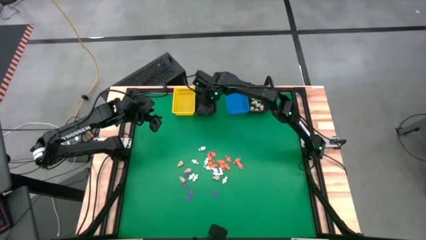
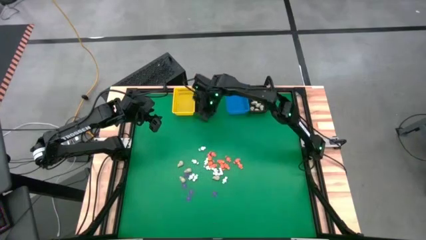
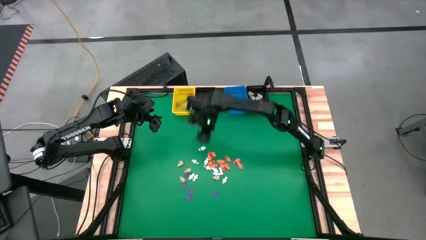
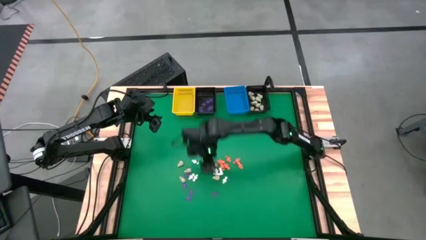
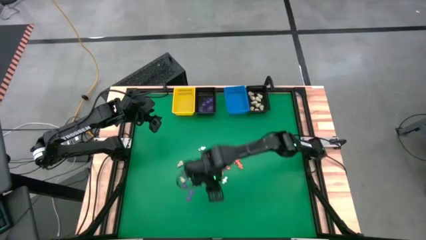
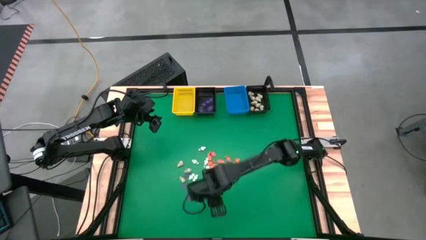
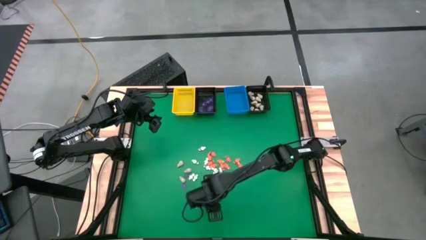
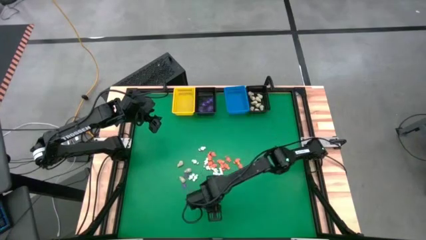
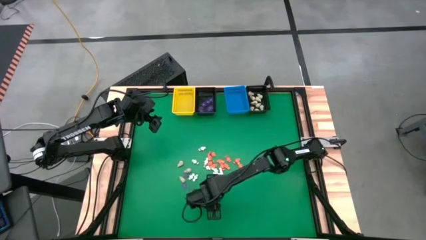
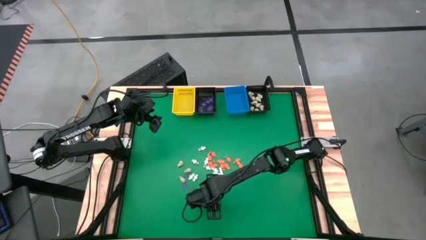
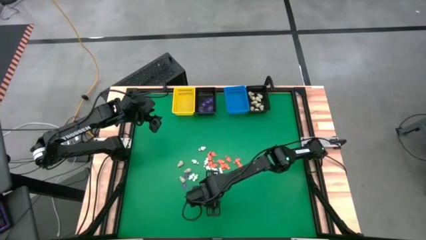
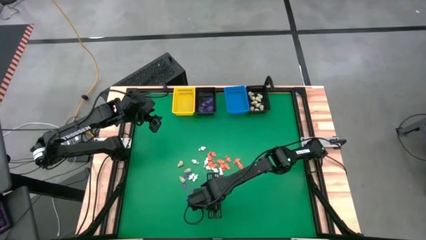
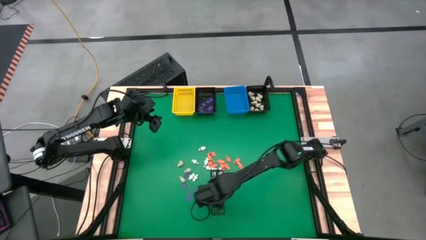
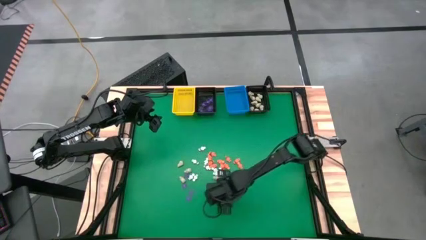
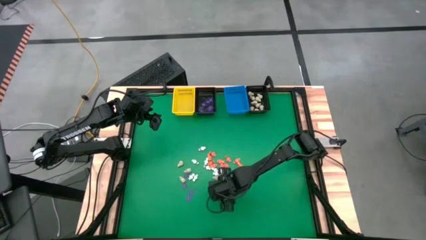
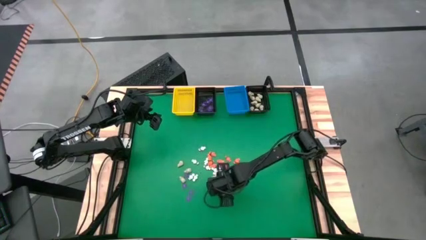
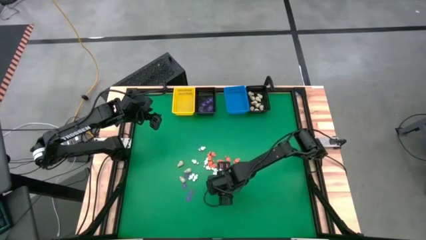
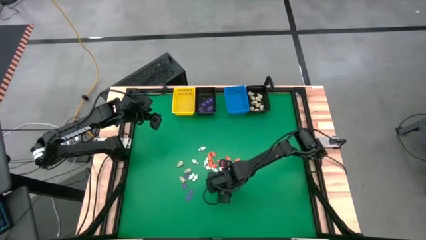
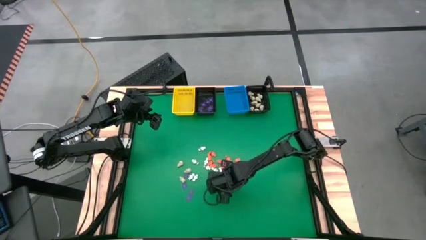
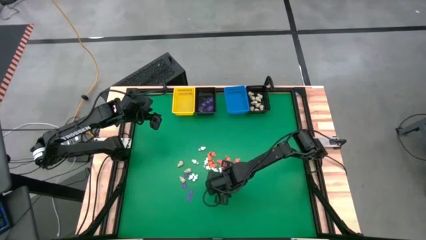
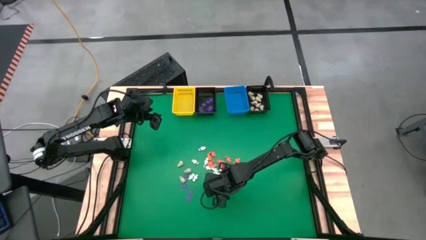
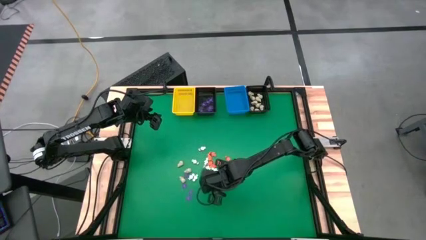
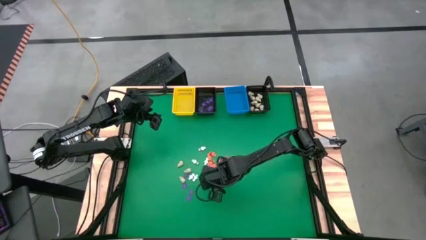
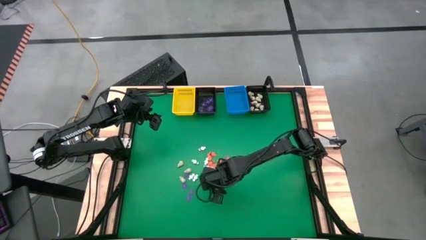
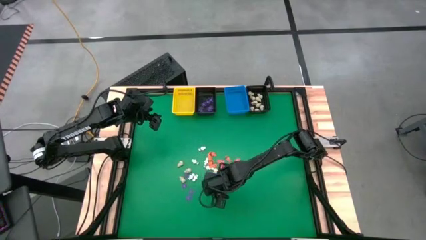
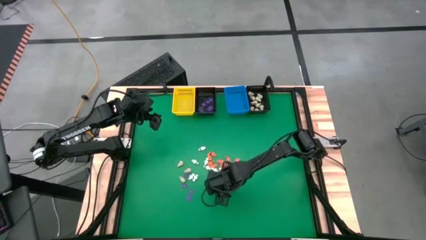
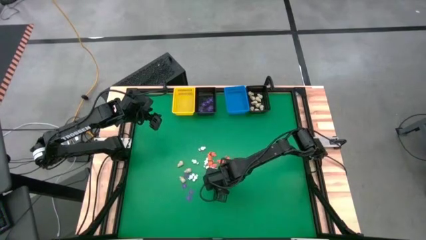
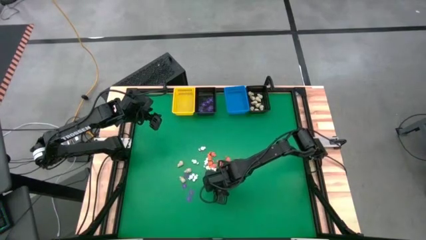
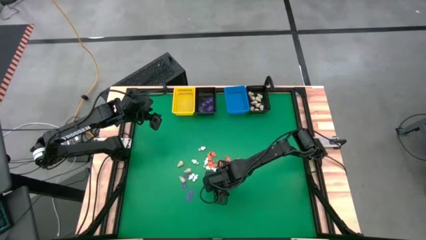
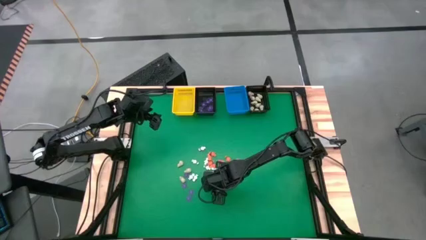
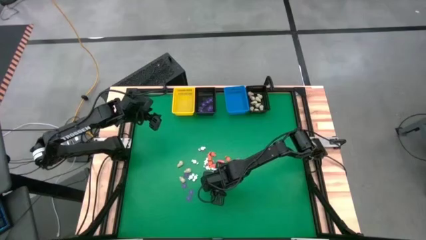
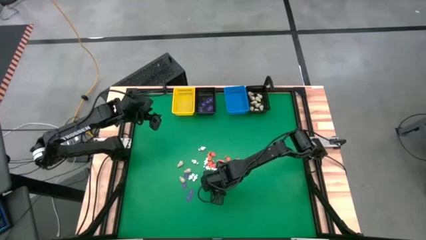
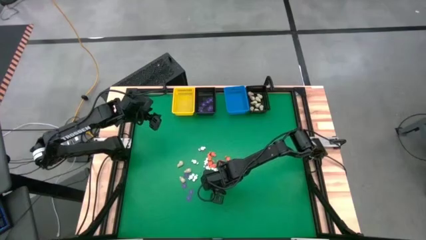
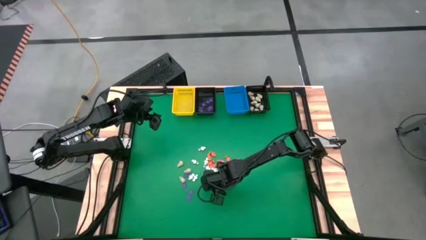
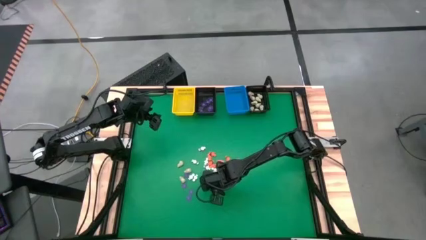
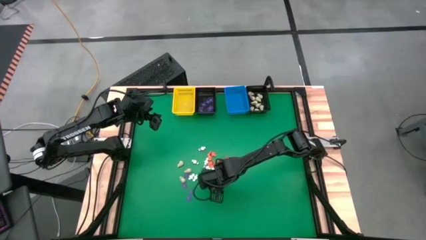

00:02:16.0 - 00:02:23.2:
Task: Sort Halloween decoration
Put the purple spider toy into the left black basket

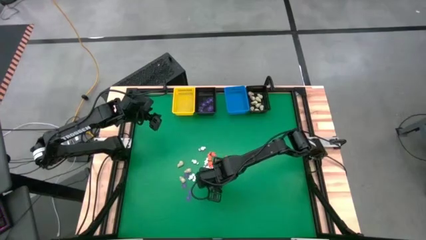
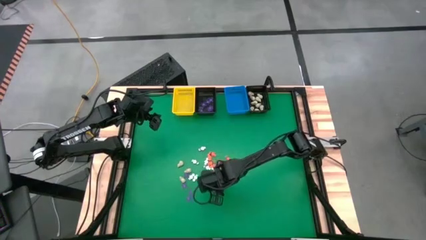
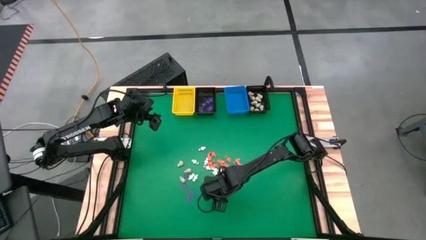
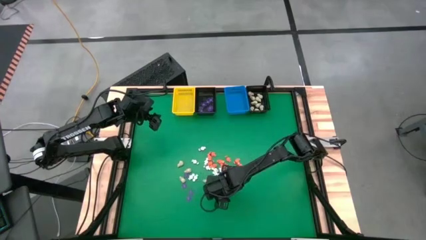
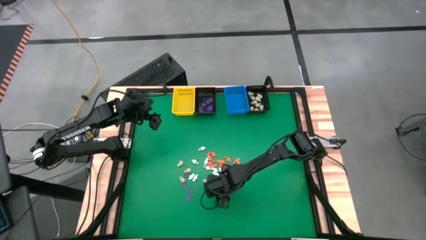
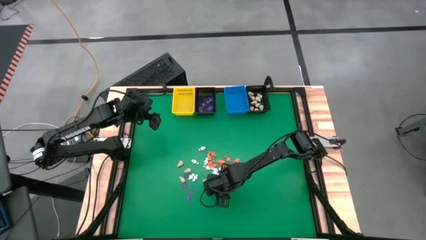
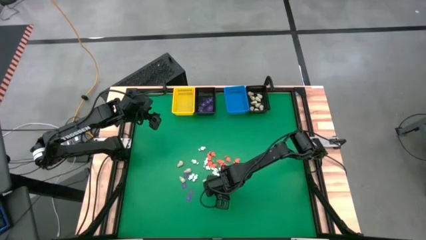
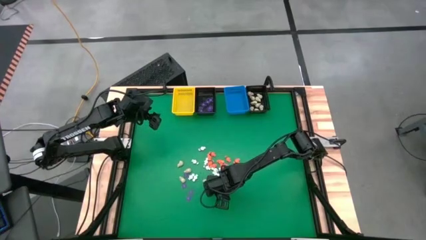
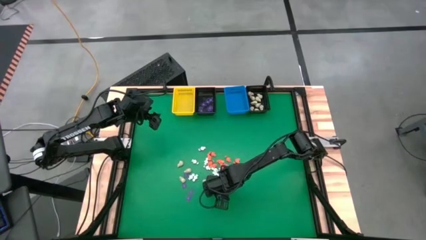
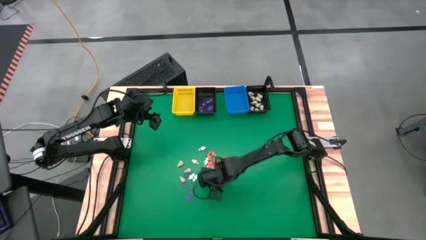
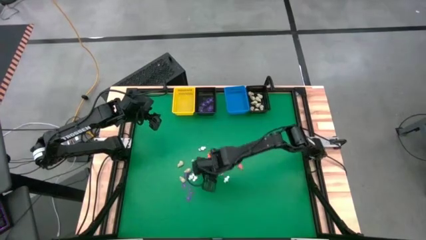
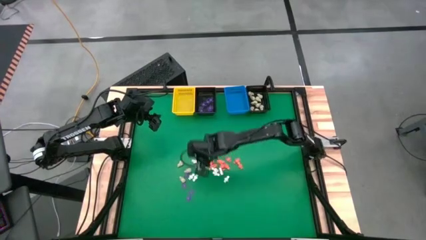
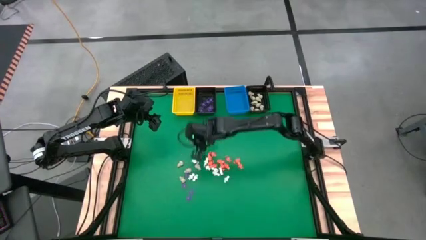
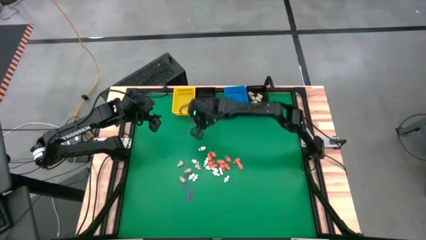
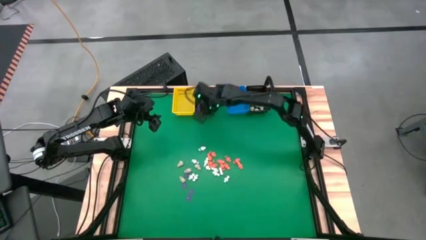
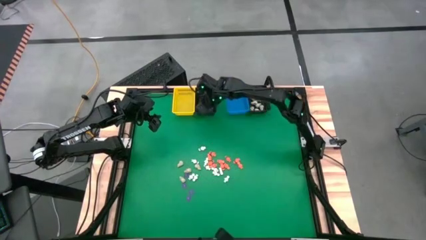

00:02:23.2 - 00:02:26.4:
Put the purple spider toy into the left black basket

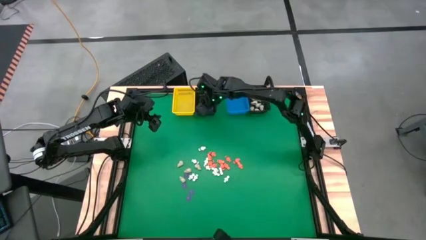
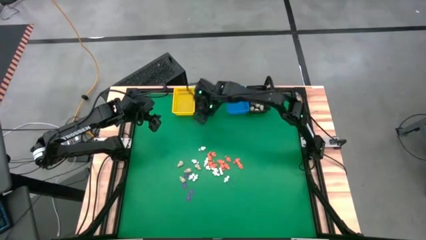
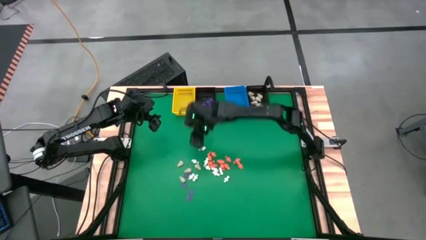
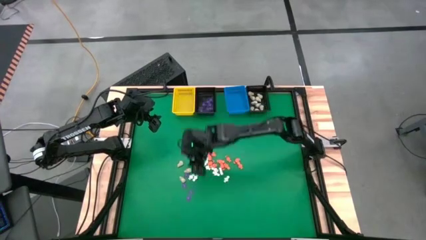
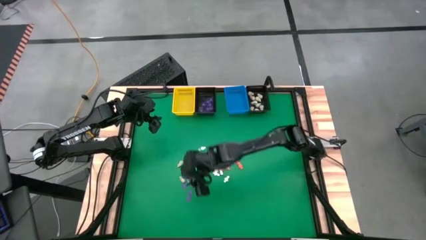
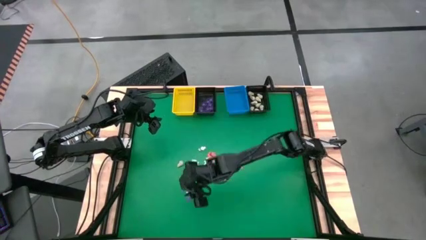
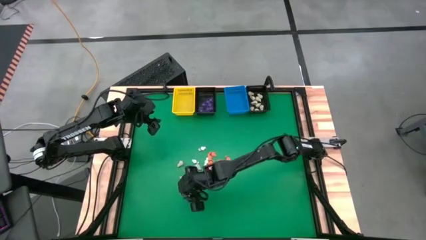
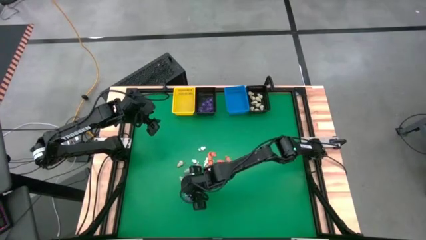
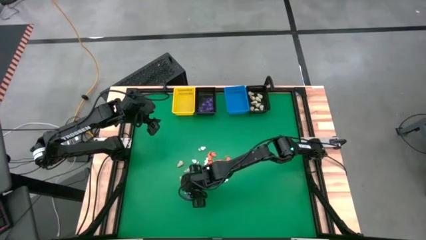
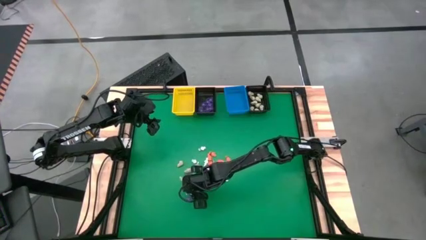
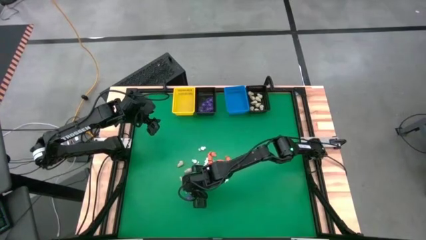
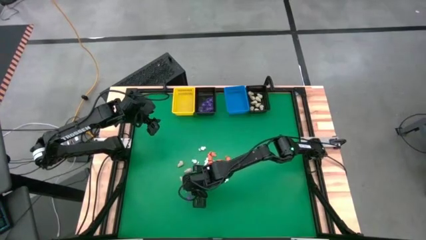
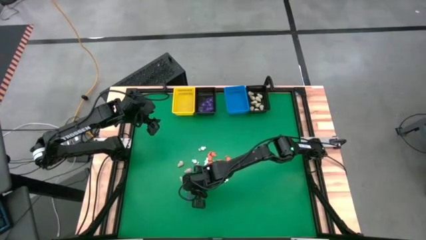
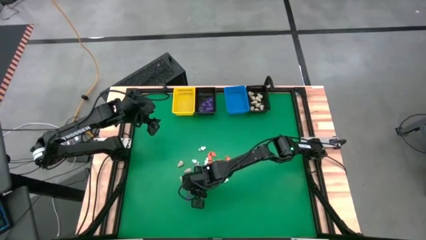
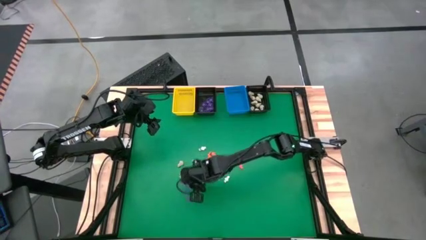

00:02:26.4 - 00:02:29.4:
Put the purple spider toy into the left black basket

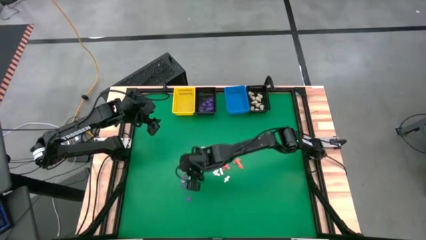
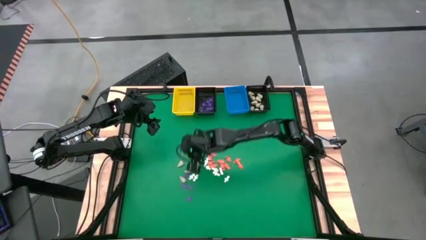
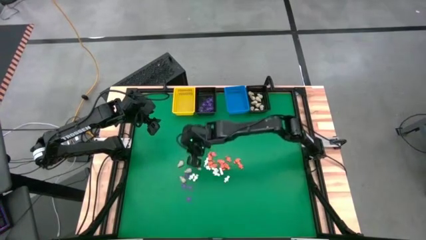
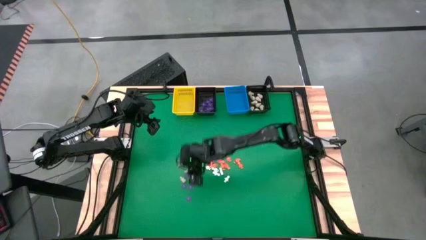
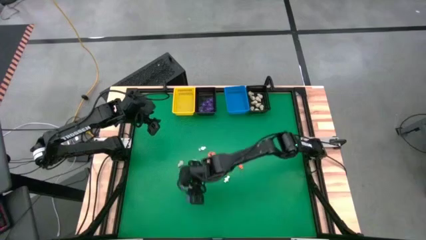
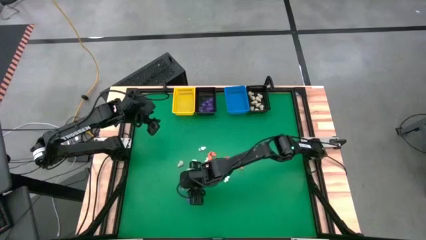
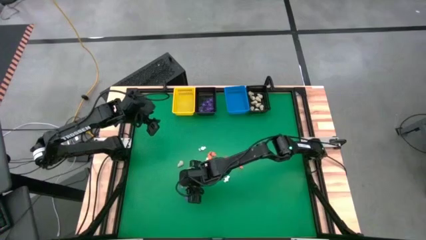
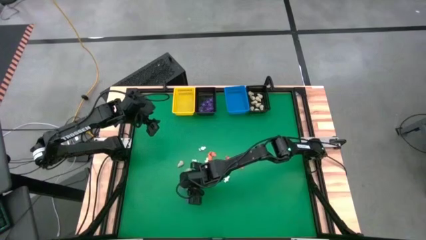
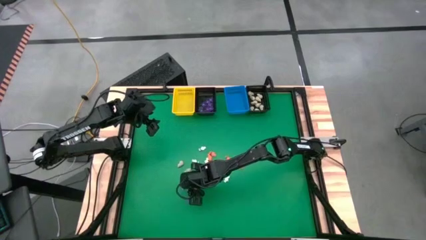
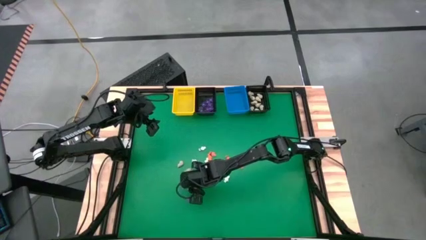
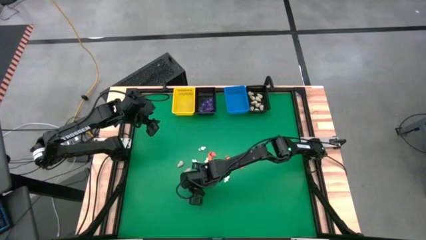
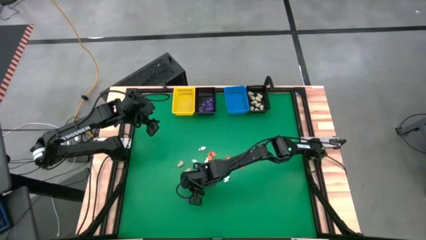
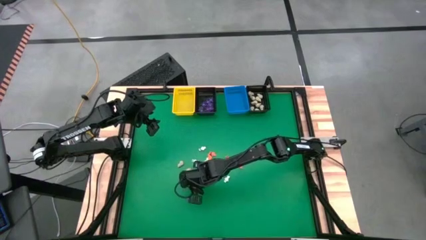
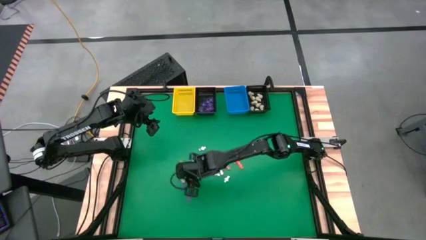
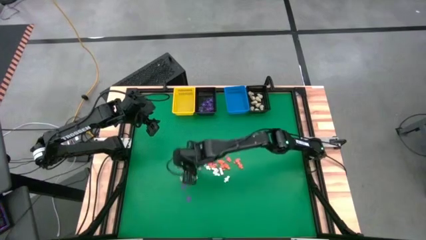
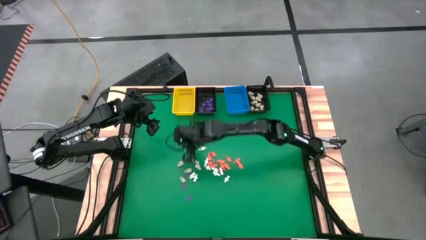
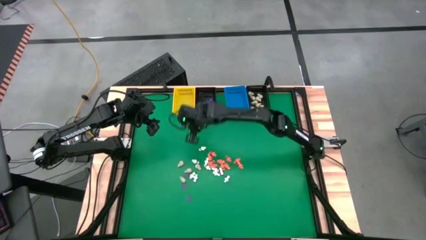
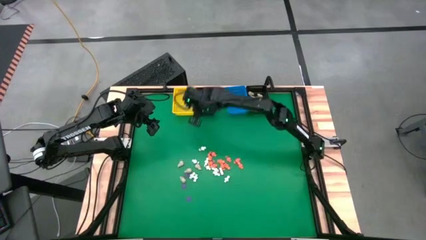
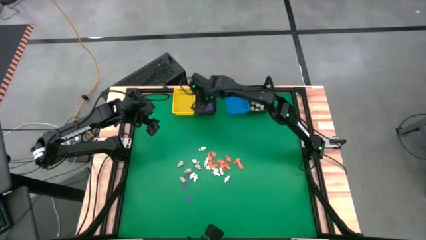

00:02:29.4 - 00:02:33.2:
Put the purple spider toy into the left black basket
